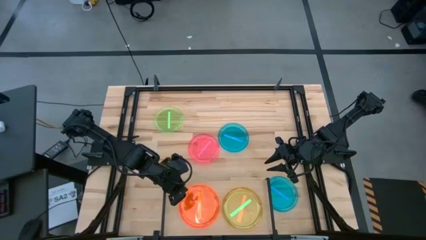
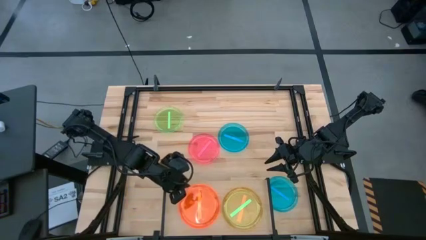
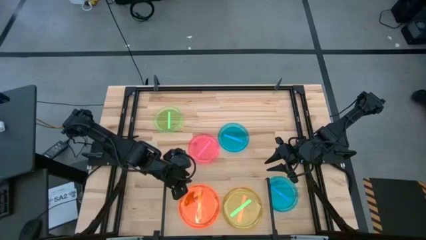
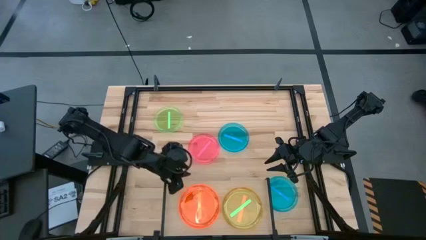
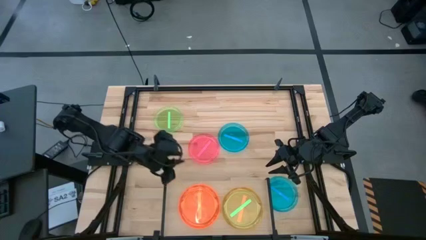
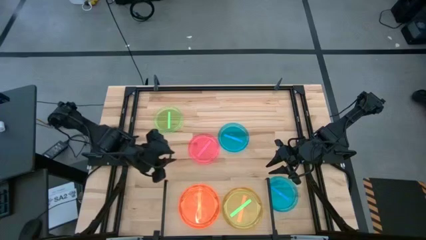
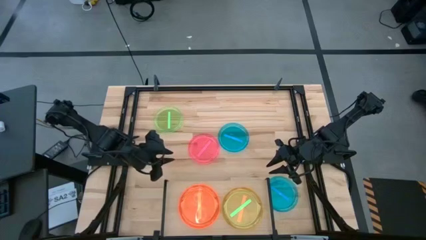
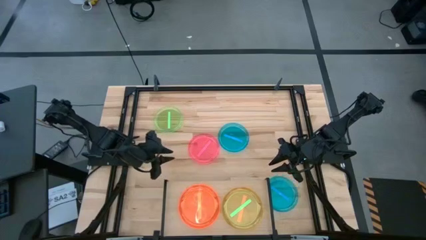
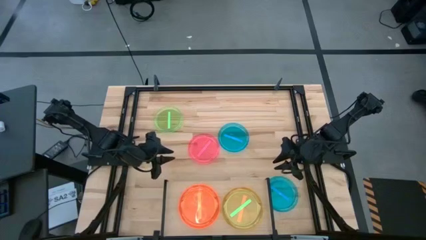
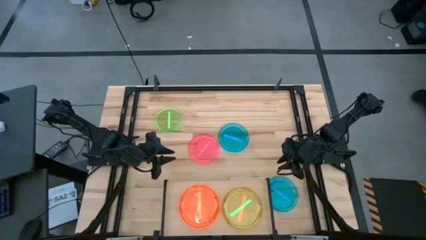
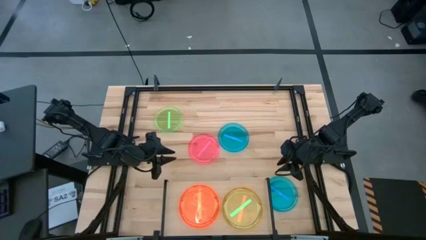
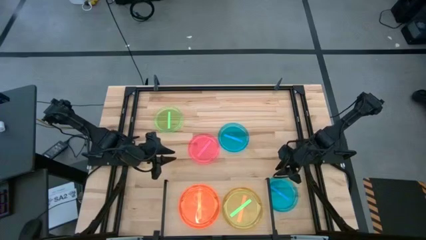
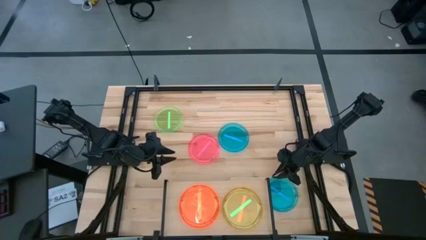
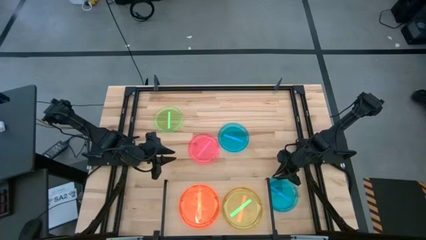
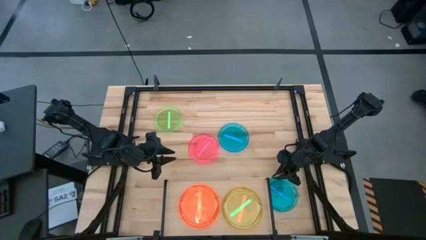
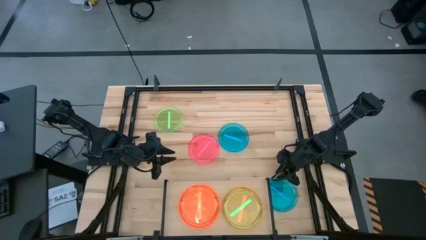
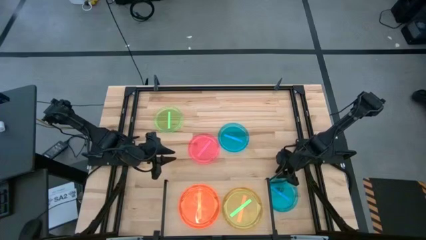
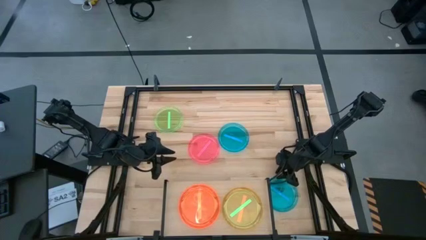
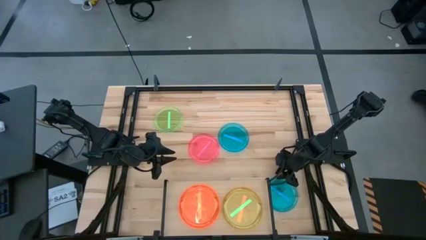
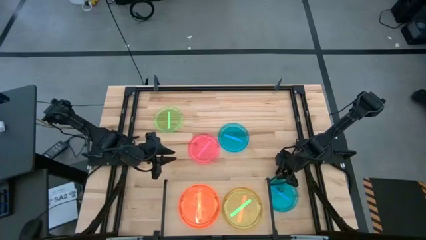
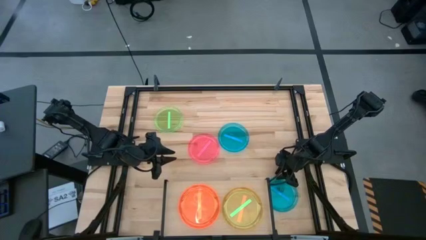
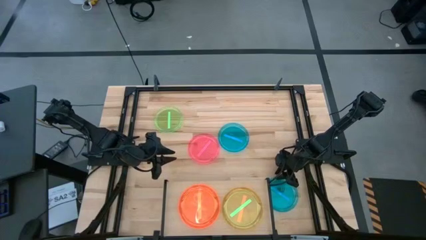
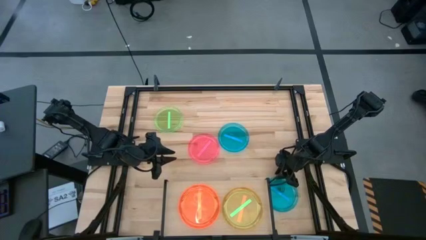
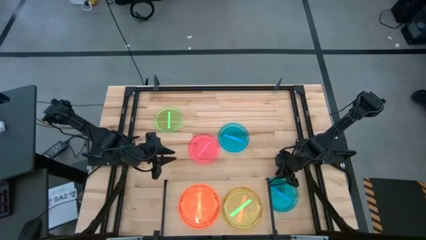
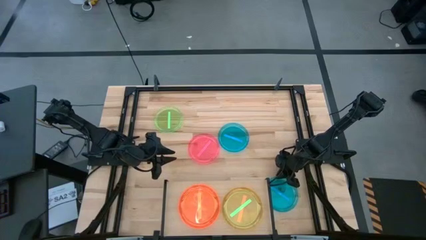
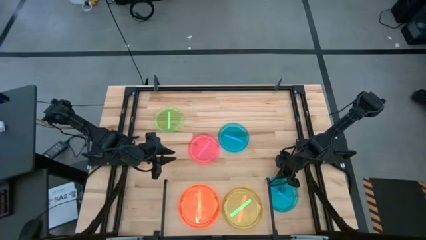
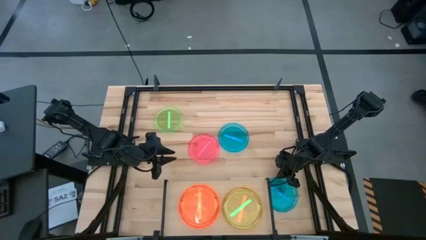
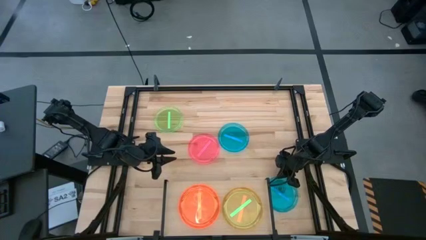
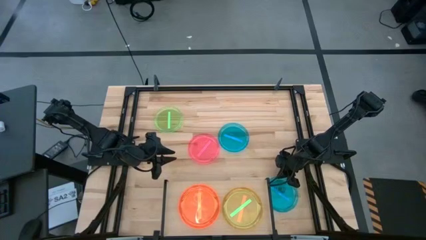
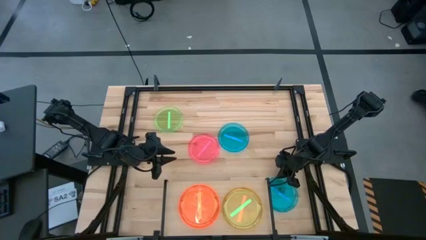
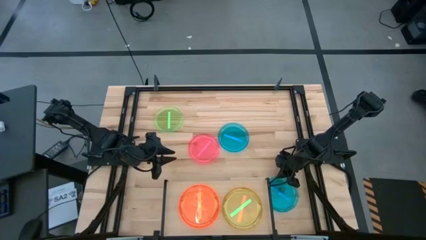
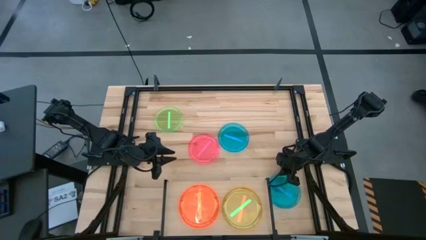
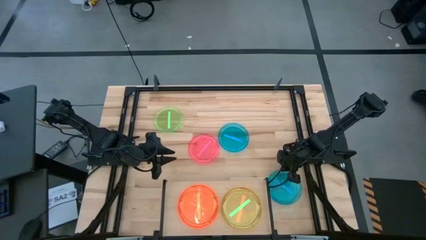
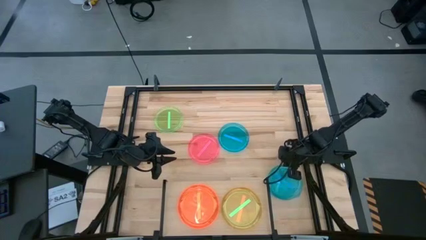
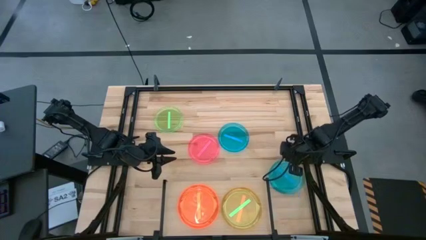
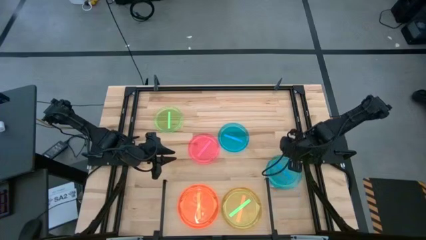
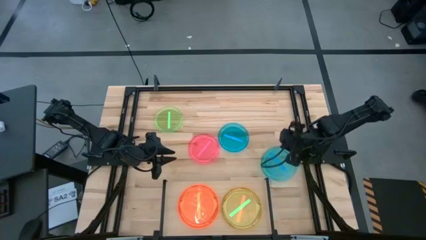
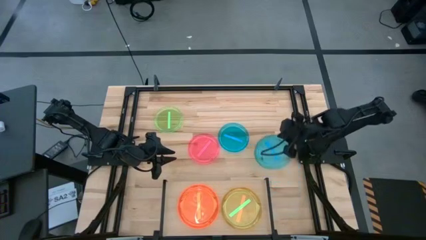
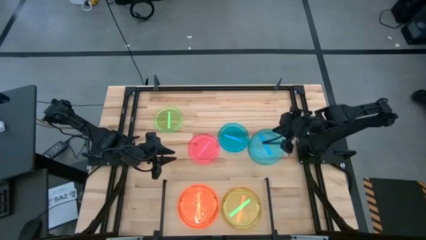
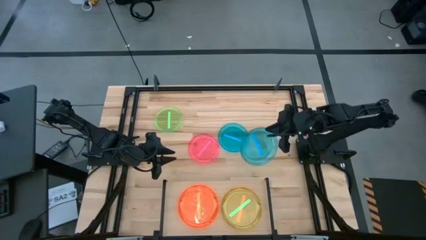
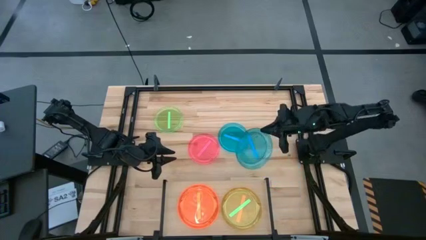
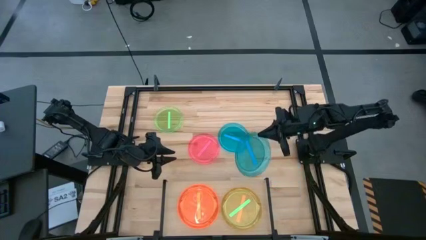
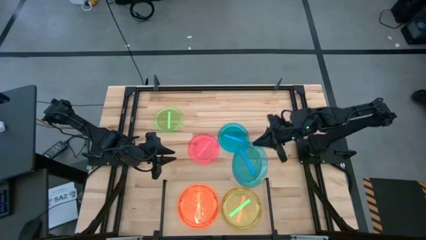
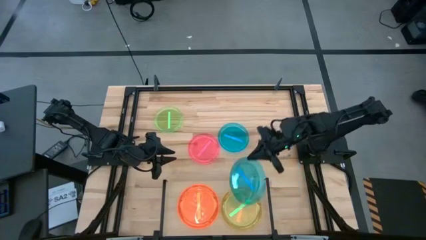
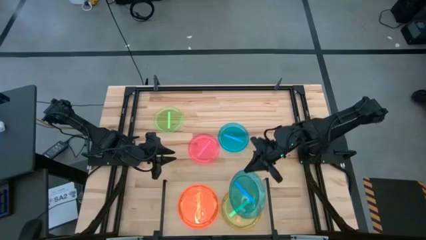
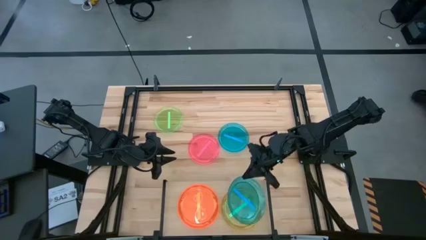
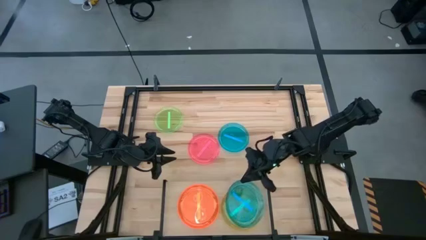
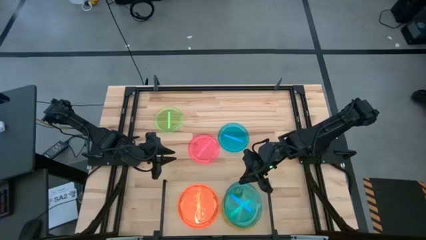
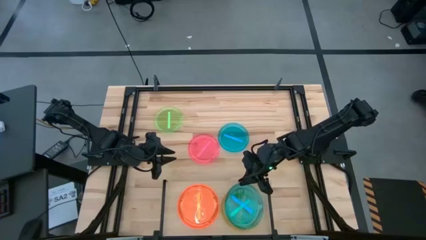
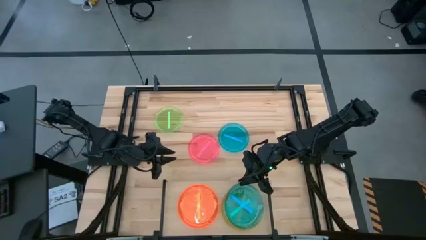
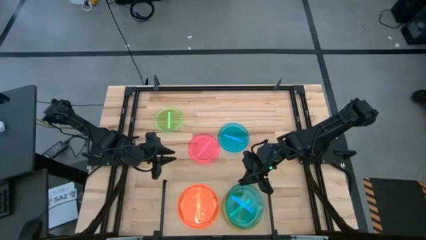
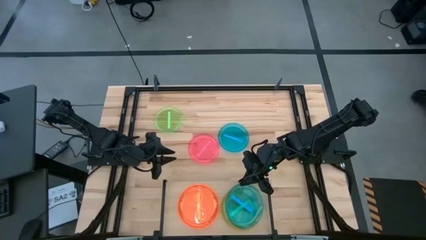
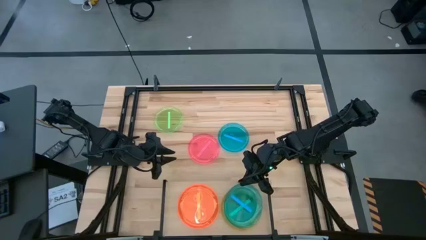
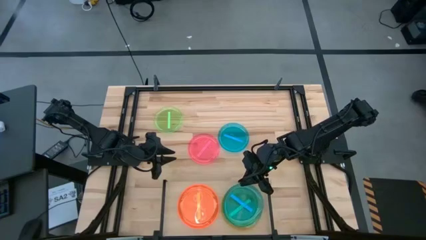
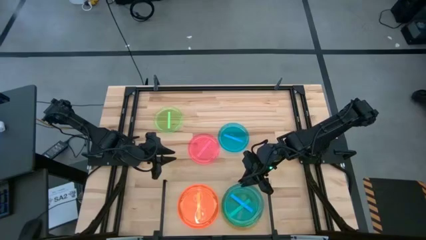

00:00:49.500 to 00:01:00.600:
Task: Place and stack plates onto a shelf
Stack the bottom blue plate on top of the green plate on the shelf
